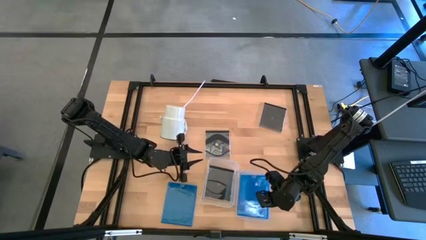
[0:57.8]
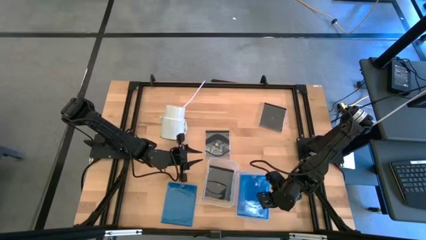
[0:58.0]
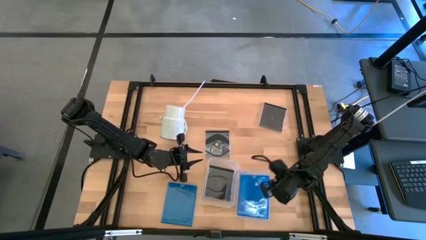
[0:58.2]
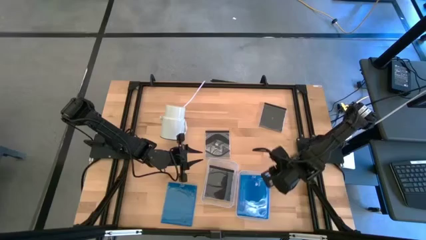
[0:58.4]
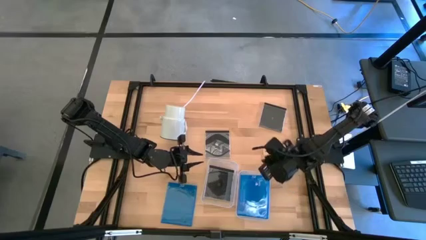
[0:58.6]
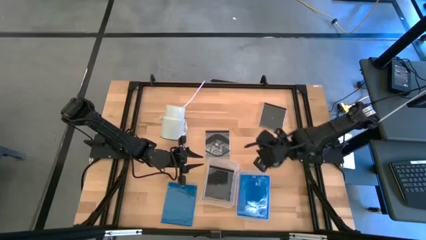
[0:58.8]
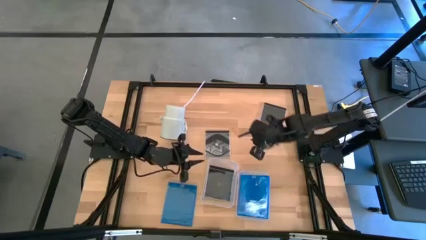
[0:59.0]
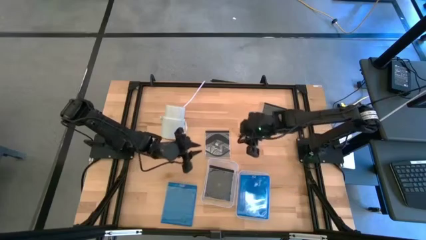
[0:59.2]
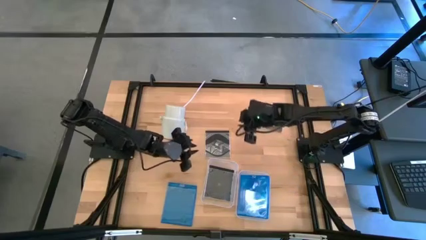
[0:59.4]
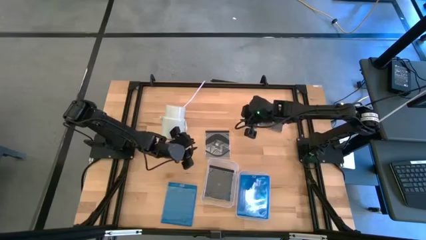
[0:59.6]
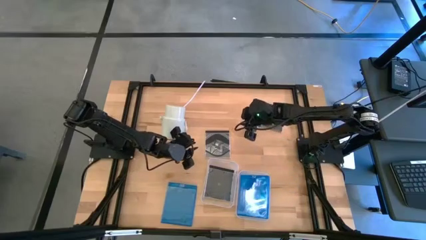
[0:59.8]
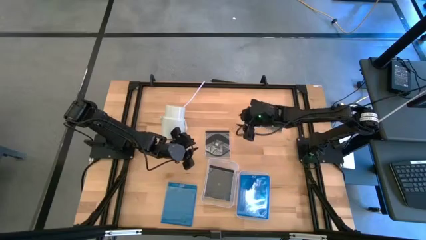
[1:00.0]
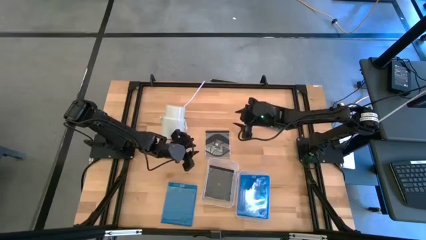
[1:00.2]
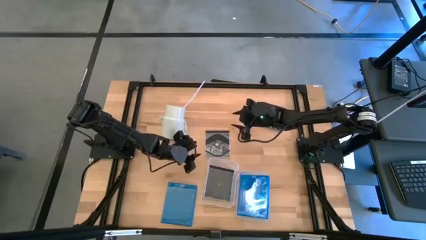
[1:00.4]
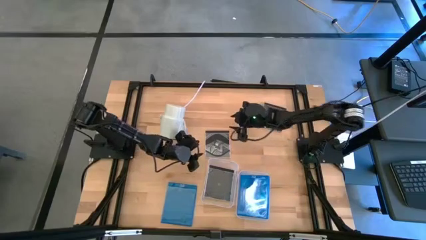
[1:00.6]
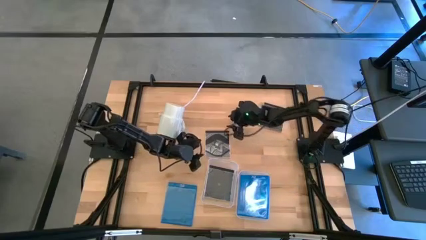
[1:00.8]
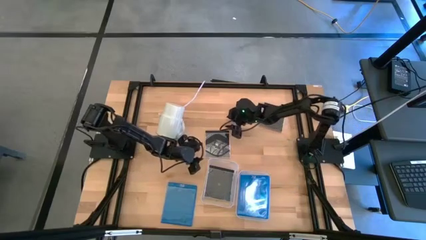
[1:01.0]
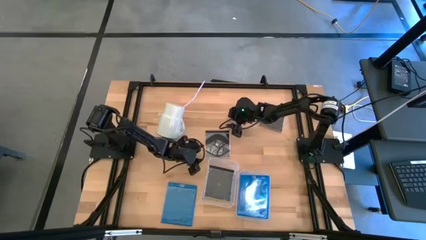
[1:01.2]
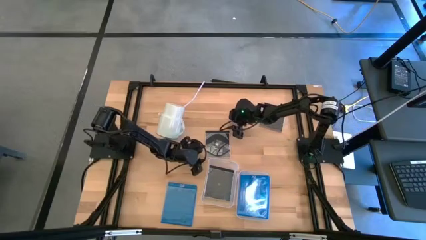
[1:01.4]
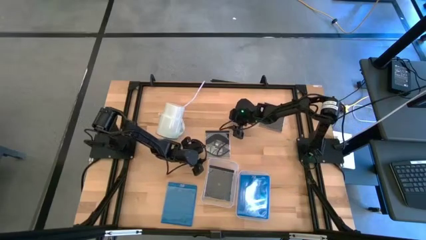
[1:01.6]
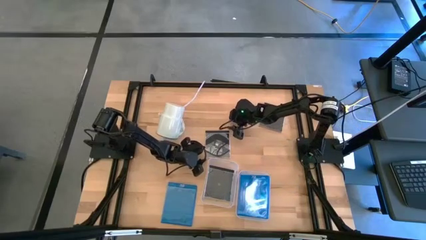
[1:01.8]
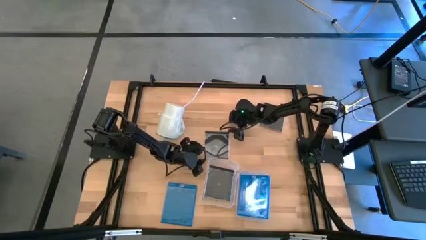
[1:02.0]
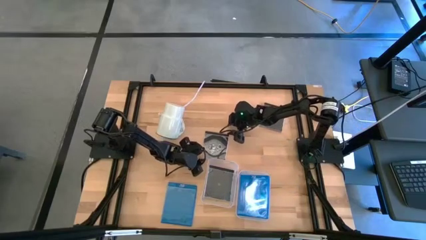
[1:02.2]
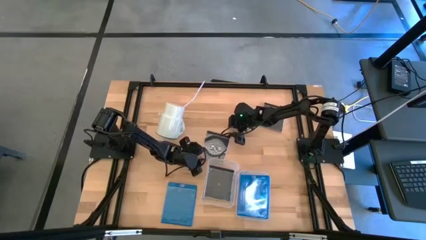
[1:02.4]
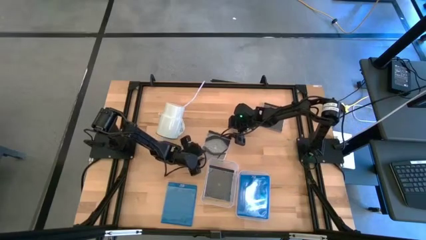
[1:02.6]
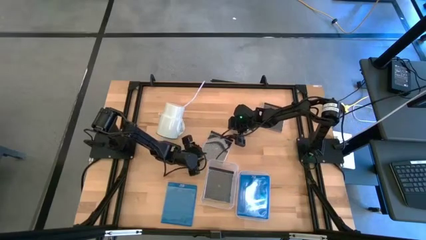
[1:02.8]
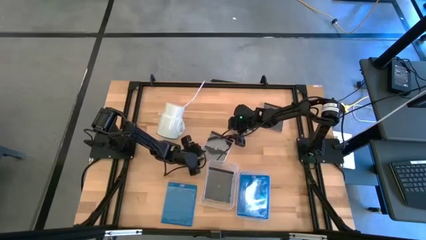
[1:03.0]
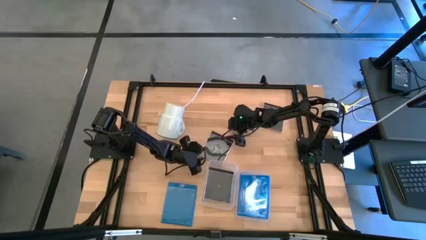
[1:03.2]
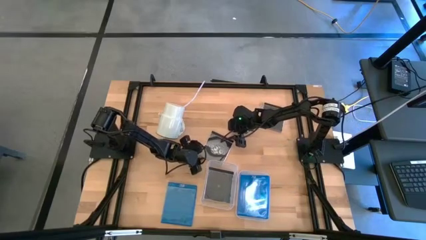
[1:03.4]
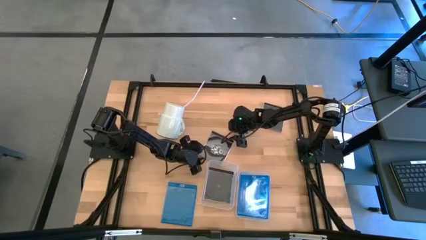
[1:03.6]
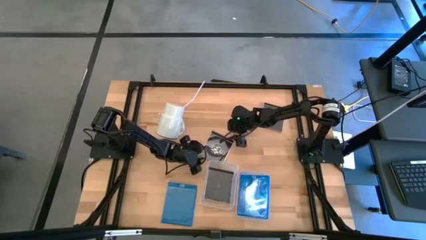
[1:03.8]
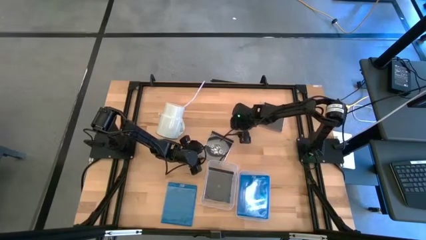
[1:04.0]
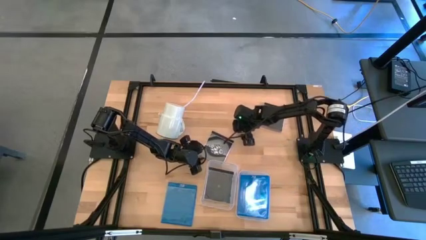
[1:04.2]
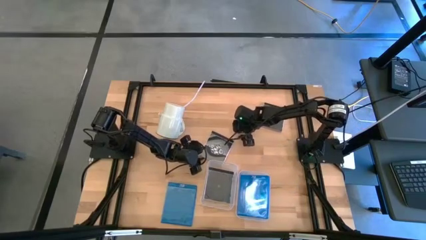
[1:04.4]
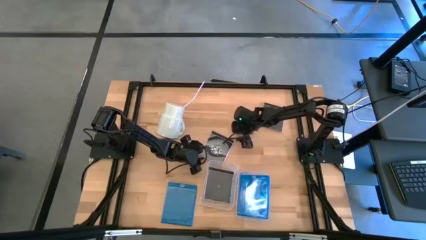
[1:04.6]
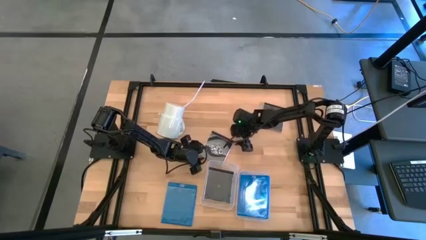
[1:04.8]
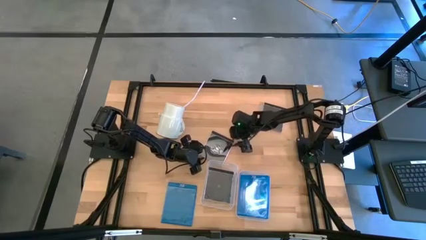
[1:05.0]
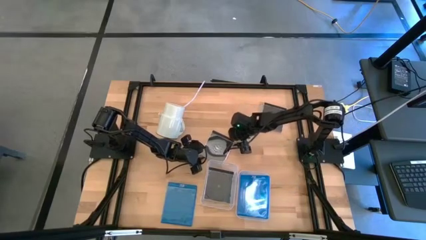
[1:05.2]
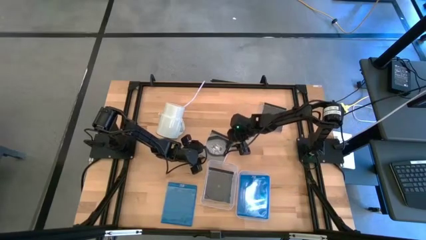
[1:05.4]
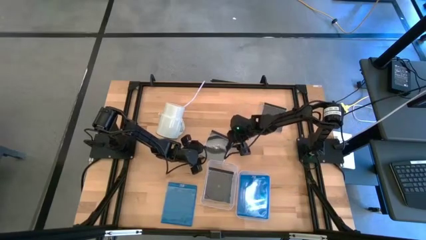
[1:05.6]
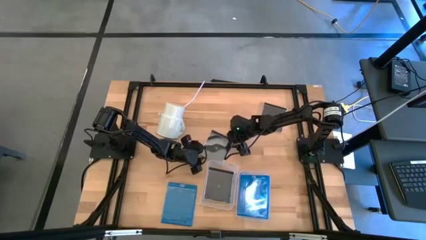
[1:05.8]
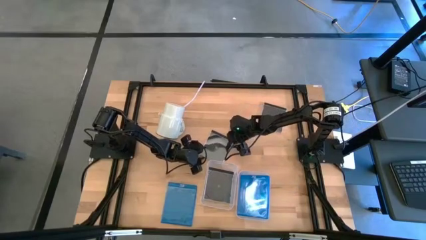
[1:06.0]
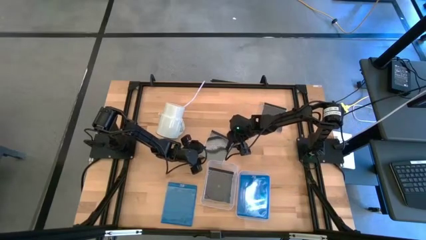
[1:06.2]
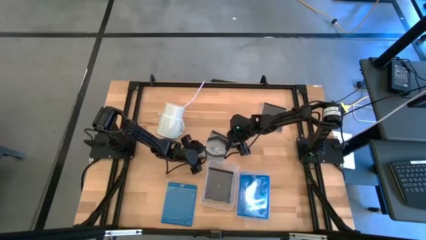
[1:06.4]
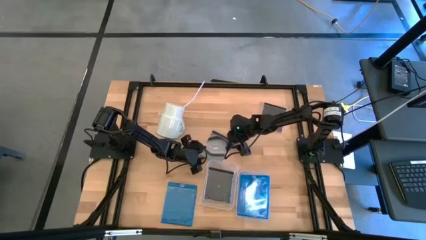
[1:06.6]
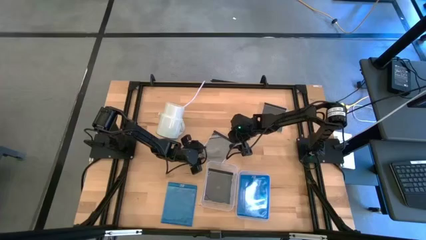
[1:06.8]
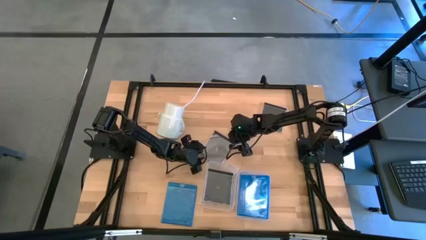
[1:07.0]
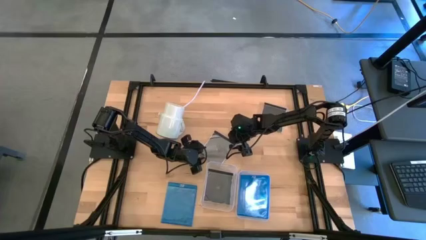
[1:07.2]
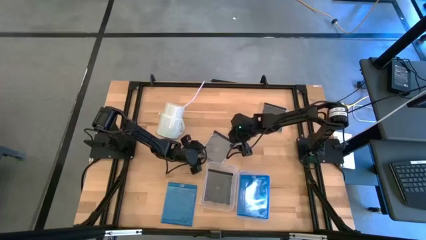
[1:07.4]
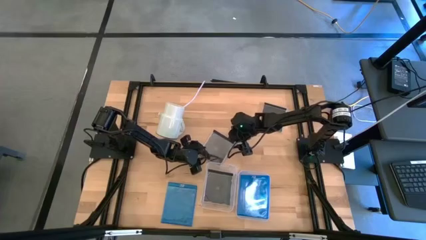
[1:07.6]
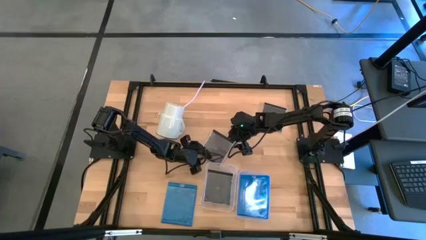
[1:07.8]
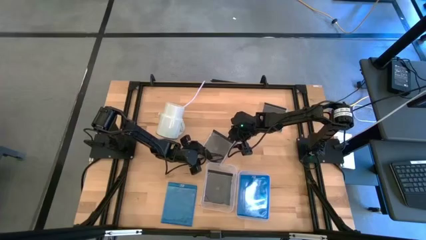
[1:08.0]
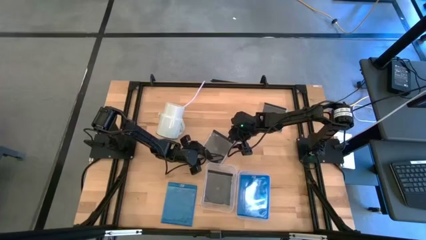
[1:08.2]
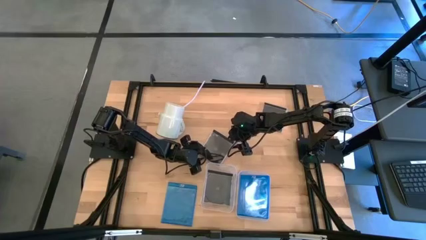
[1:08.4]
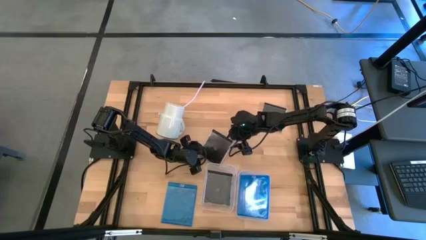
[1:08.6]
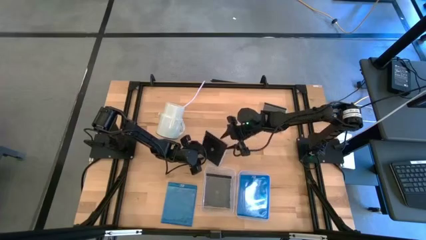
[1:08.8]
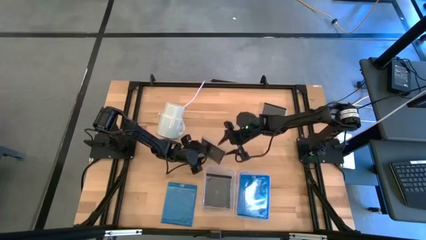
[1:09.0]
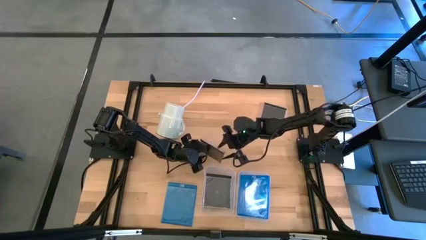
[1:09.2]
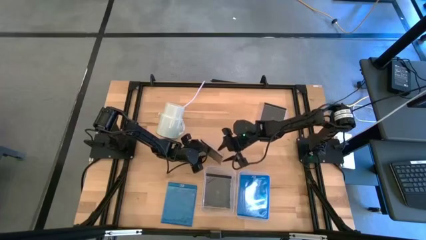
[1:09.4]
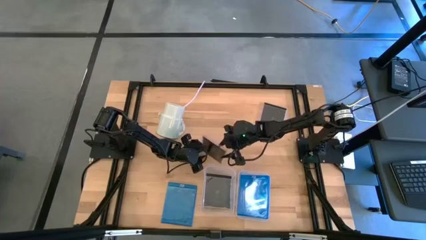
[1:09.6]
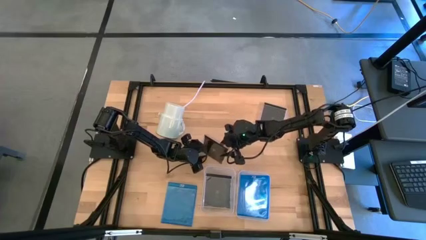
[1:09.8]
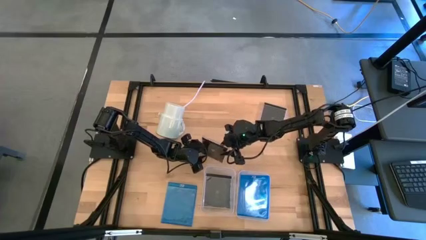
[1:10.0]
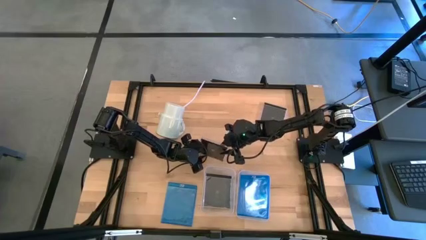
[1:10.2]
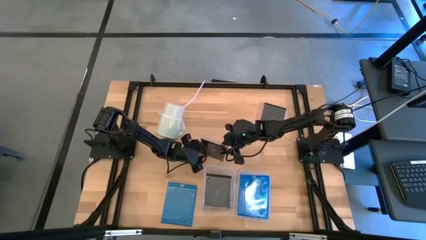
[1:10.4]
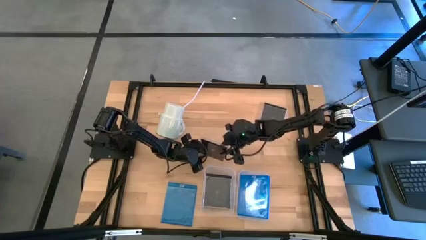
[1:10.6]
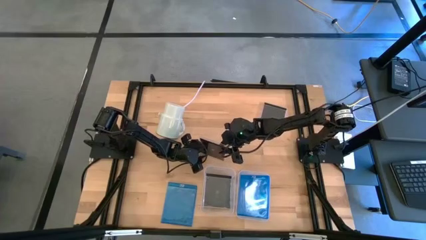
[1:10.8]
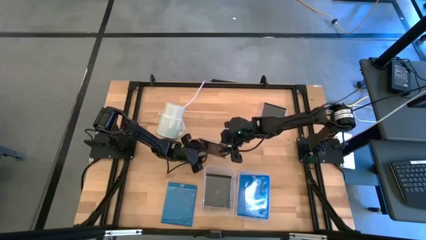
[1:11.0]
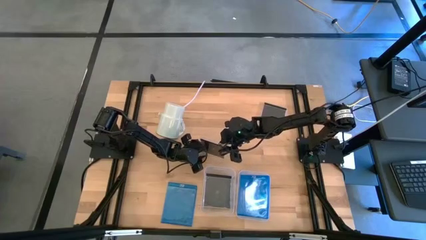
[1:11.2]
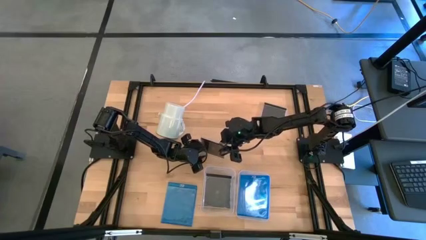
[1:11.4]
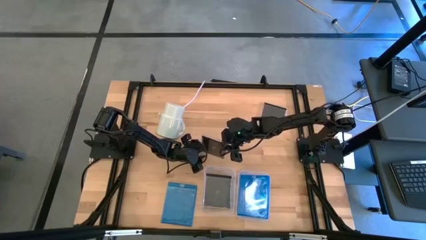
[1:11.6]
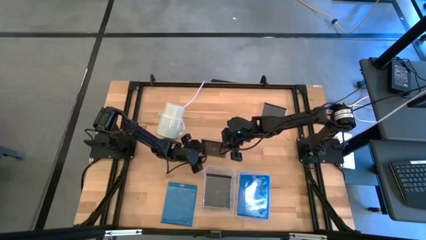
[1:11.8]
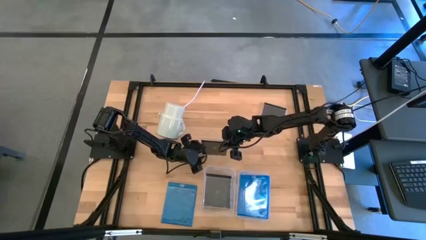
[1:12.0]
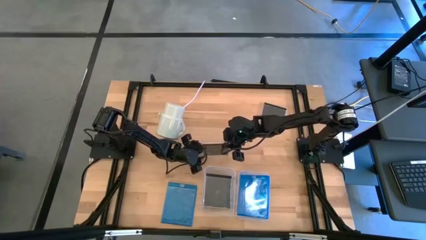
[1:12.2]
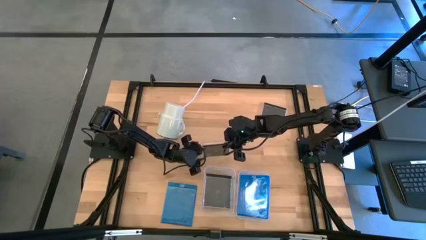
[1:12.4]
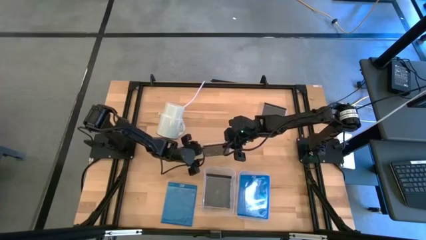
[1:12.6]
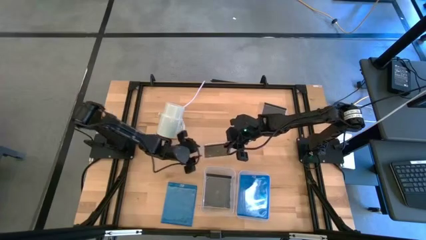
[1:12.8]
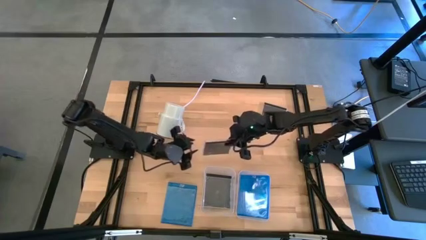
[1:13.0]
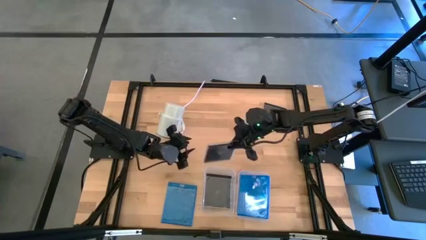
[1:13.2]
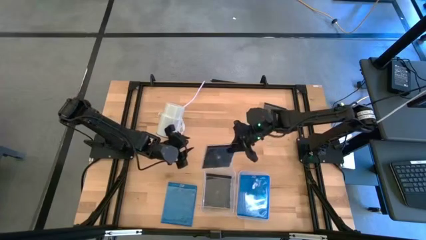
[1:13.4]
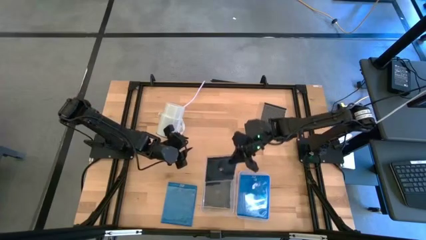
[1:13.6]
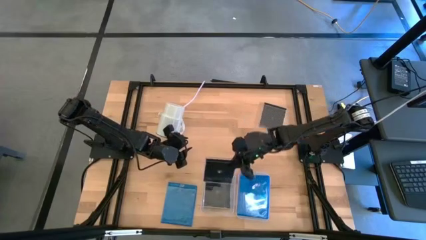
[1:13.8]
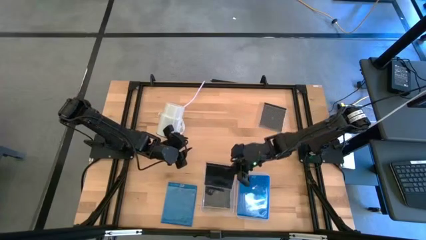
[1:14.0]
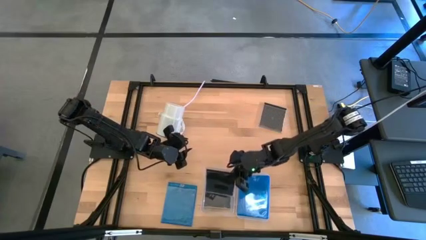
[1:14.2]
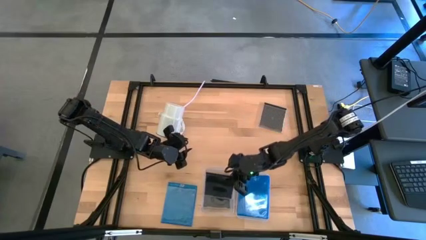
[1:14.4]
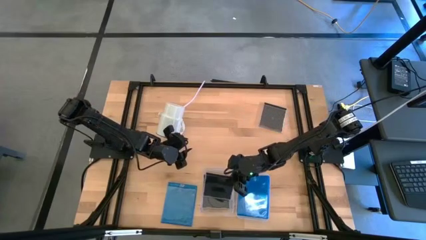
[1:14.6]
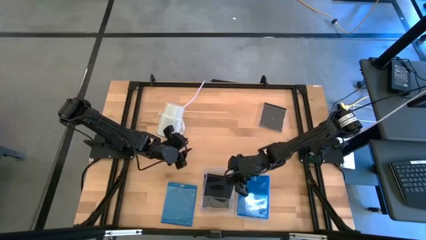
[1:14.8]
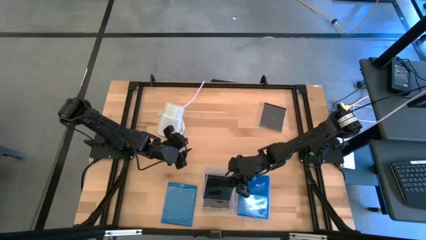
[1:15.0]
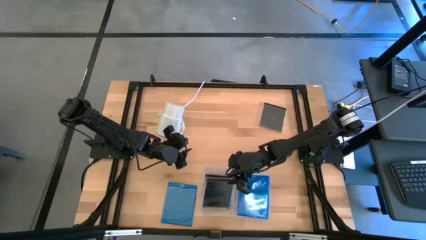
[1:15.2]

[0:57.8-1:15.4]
Task: Pick & place jewel cases by type
Put the bottom black cd case into the left transparent bin
